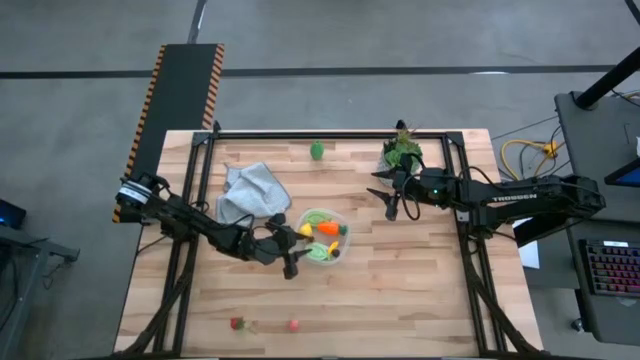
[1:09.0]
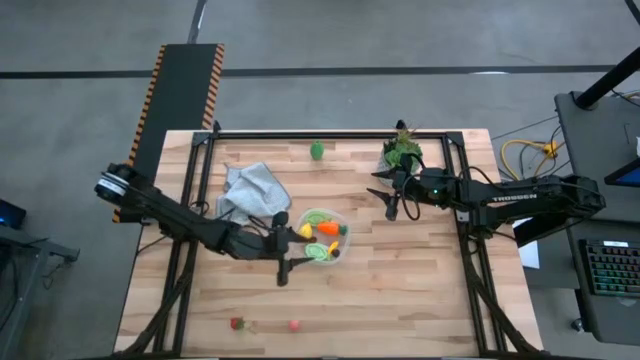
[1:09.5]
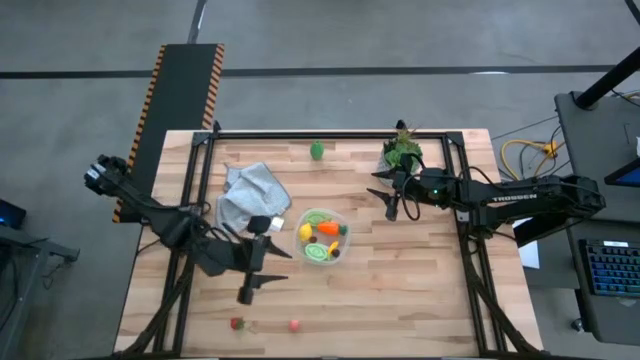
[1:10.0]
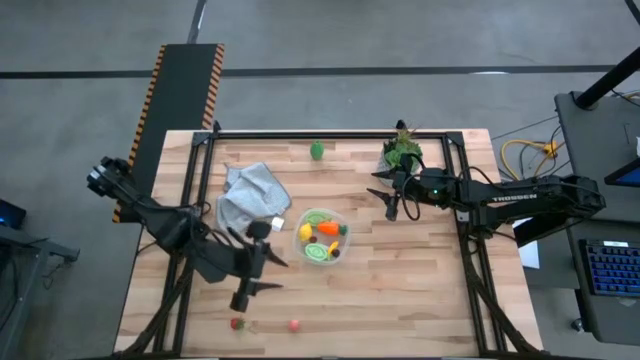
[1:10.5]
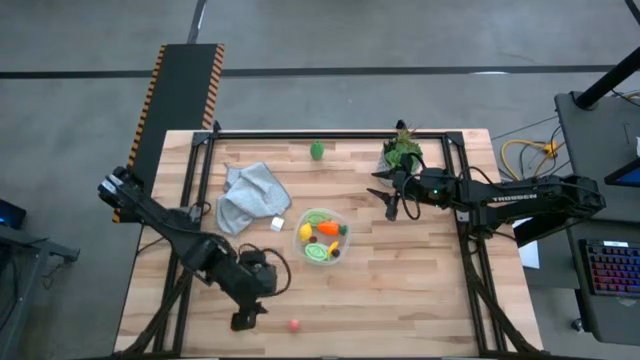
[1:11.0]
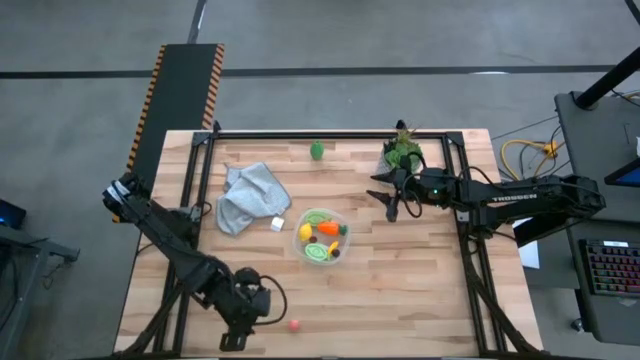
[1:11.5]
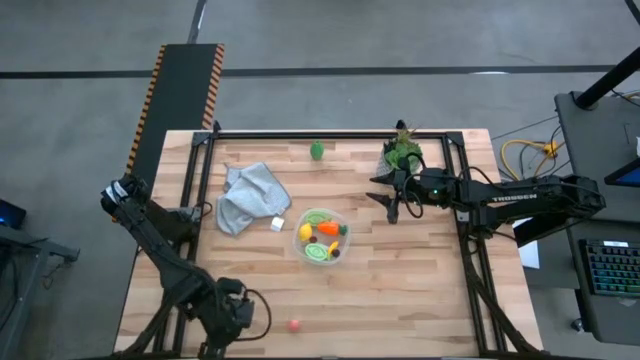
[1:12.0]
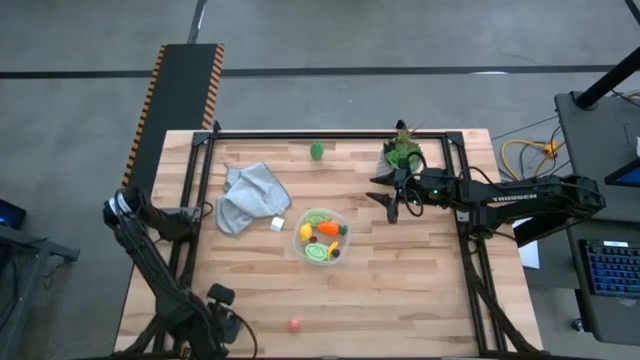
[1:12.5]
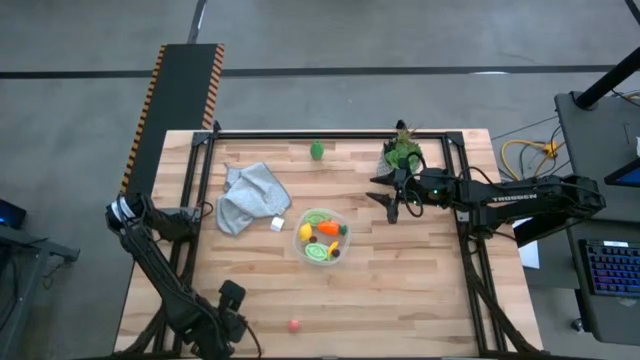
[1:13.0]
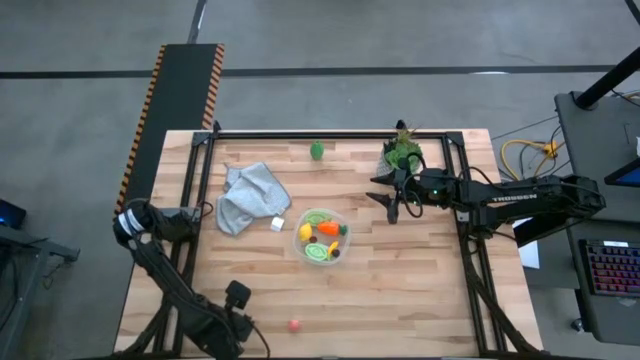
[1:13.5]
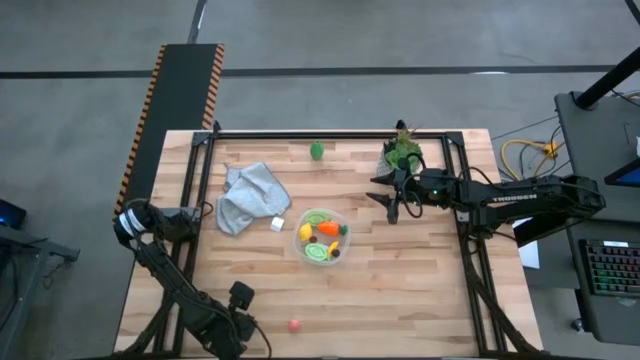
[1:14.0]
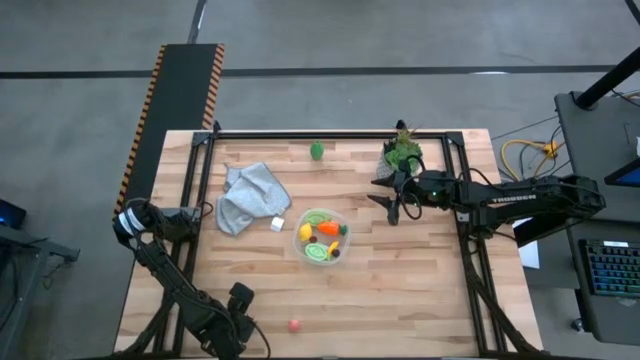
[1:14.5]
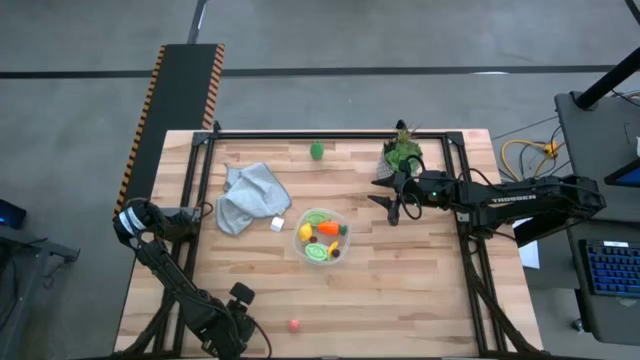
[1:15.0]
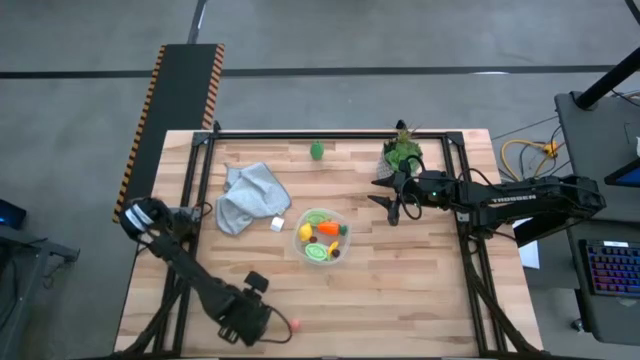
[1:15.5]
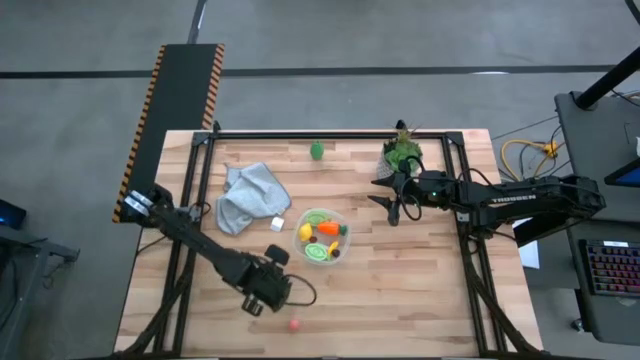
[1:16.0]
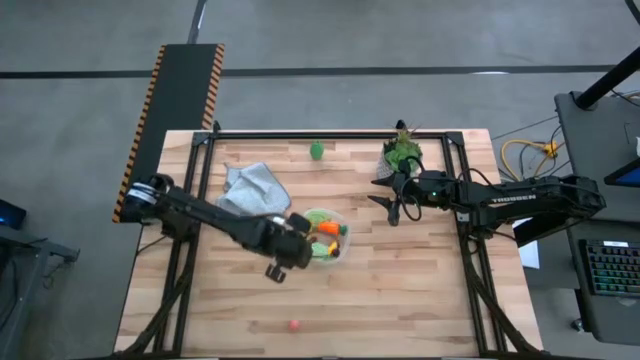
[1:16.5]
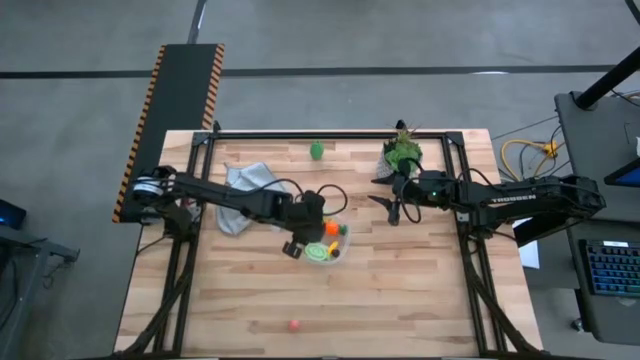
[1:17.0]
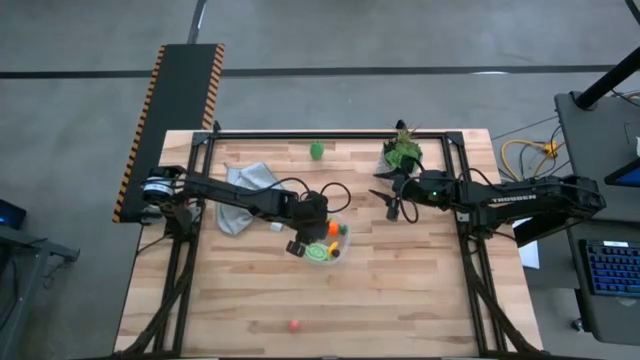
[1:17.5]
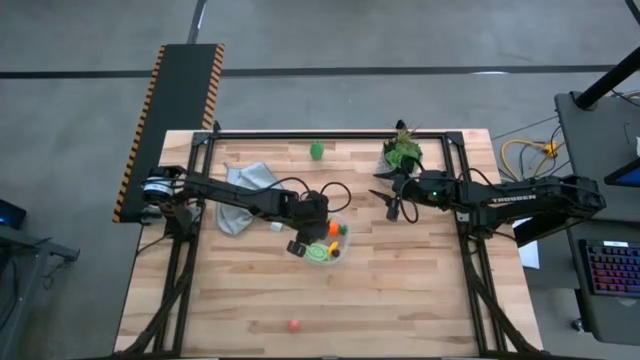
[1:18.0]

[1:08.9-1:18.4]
Task: Pick and placing Produce into tupperware
Put the red strawberry into the transparent bin

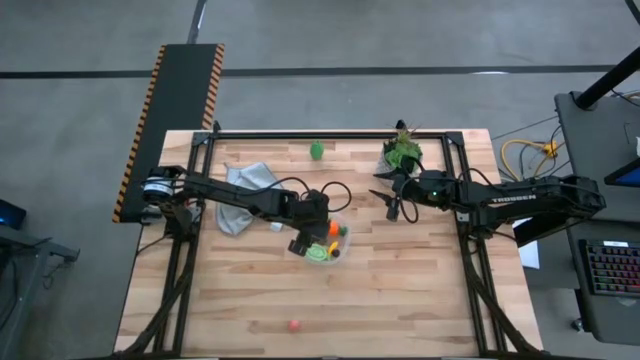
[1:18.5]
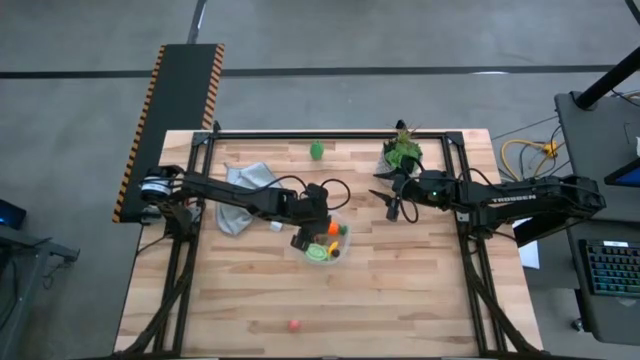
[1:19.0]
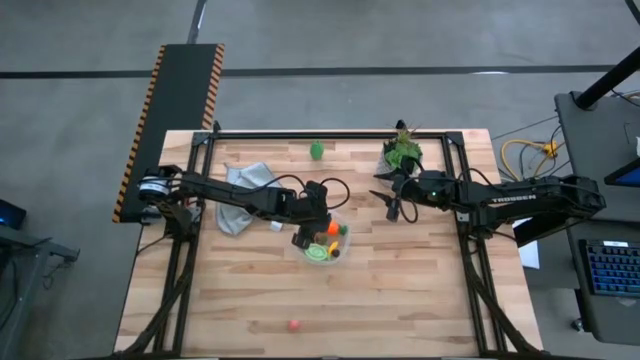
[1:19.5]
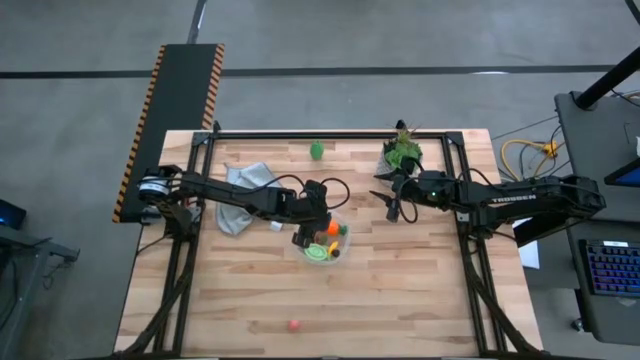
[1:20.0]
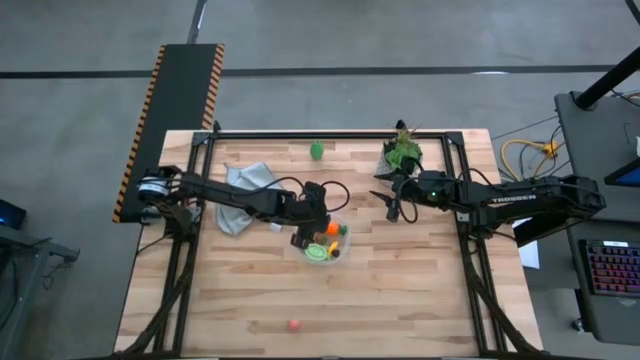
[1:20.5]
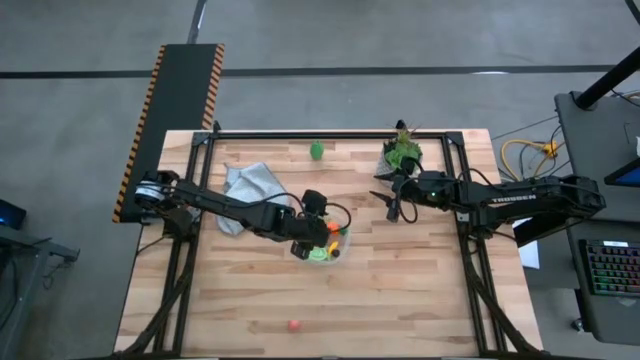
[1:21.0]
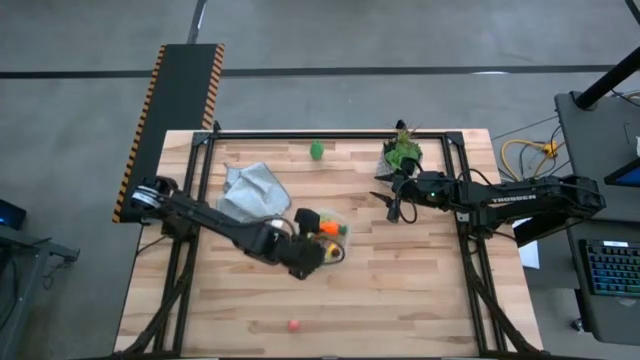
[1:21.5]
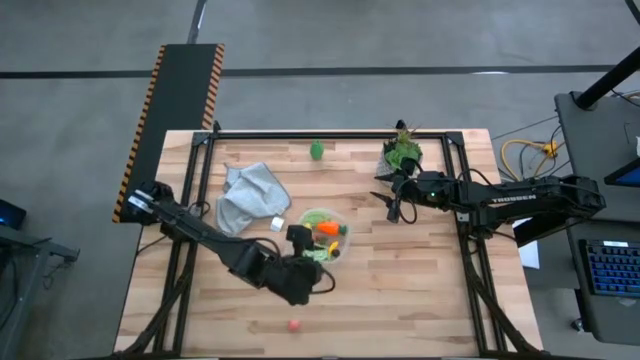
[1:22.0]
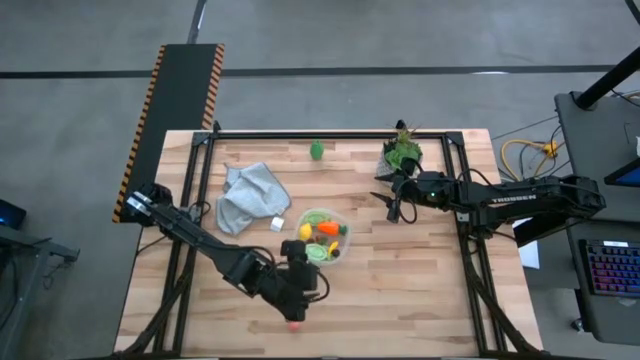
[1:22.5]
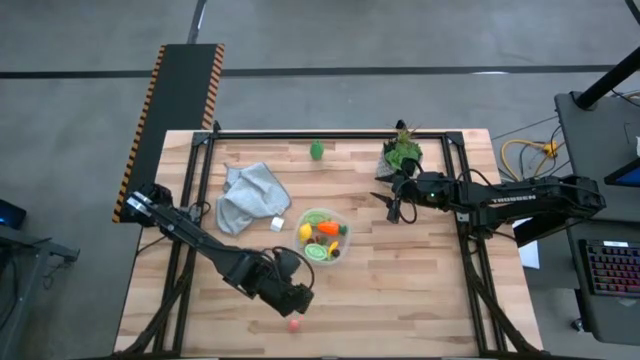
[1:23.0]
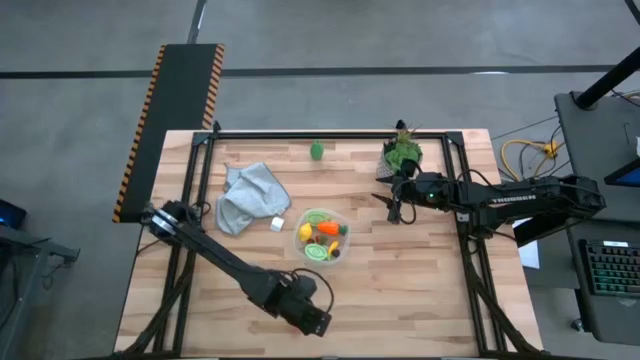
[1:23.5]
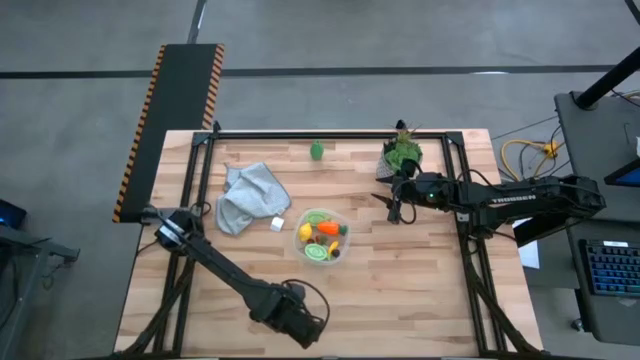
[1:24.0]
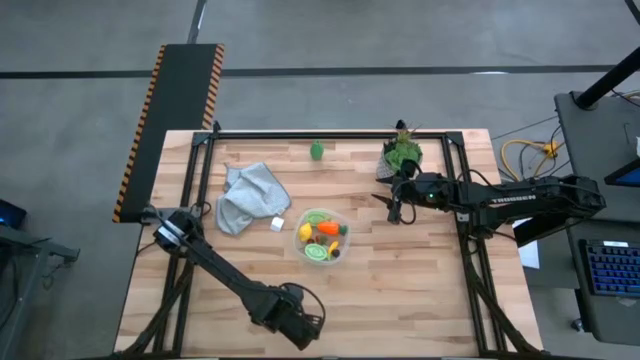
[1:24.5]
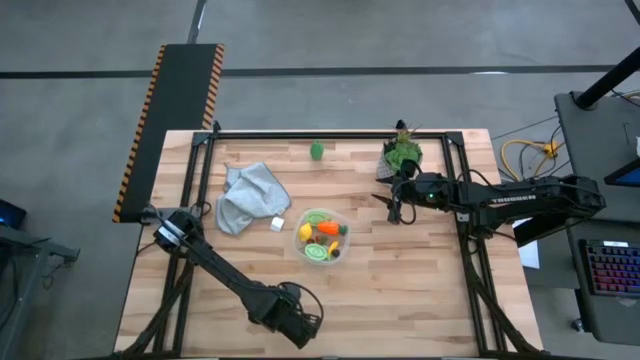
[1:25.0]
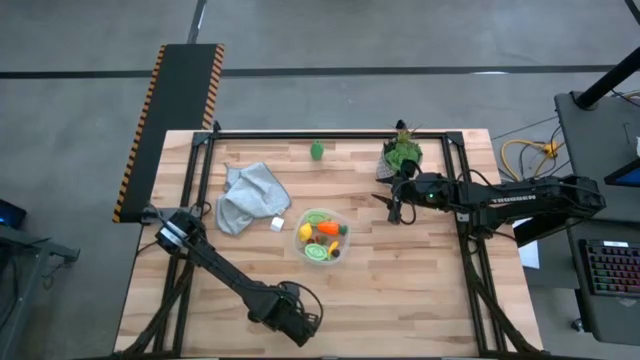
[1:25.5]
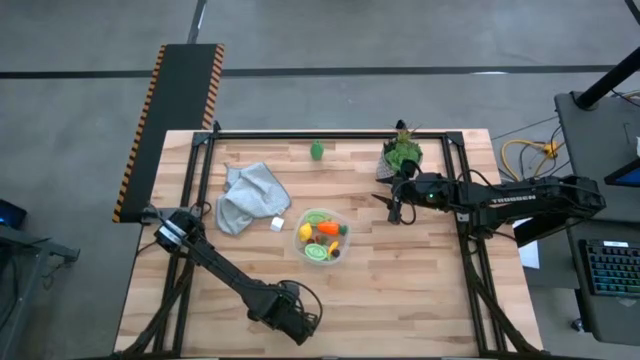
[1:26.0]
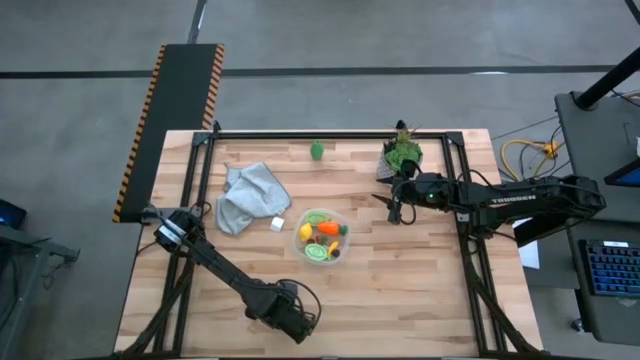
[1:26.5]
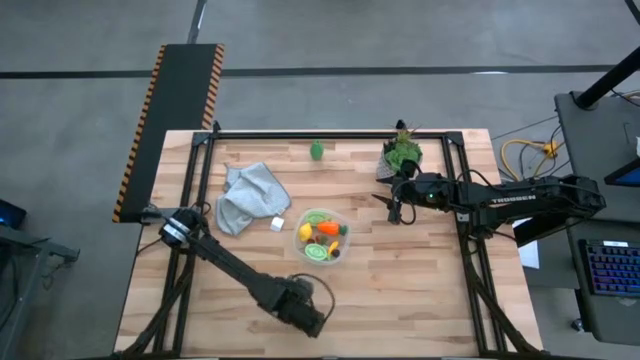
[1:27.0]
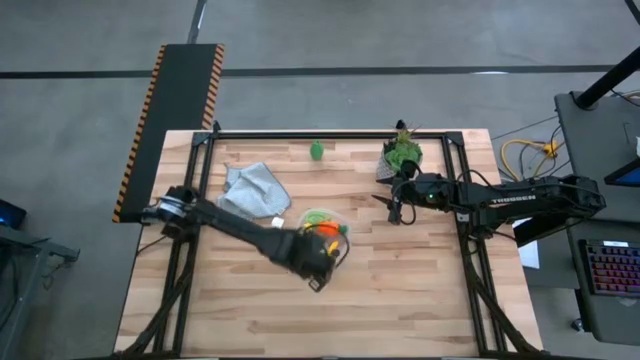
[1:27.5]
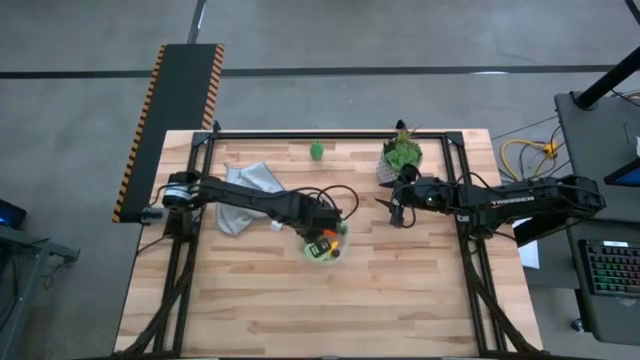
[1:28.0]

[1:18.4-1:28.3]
Put the pink peach into the transparent bin

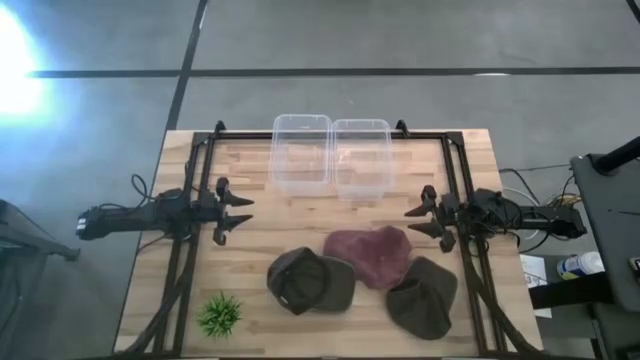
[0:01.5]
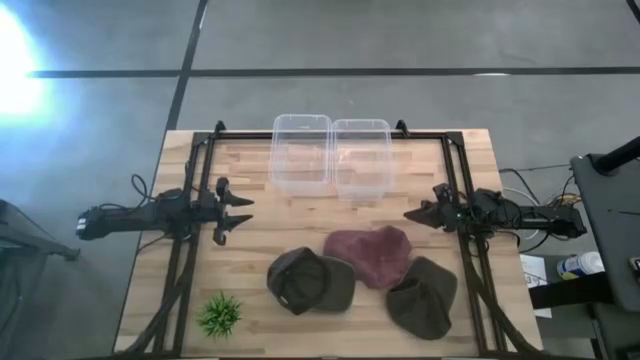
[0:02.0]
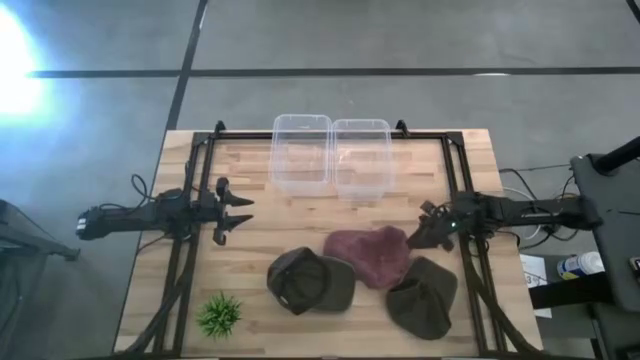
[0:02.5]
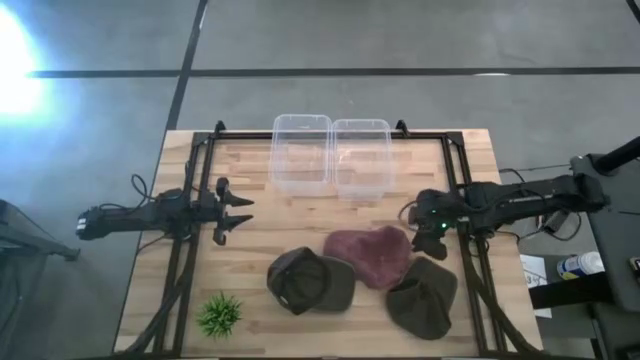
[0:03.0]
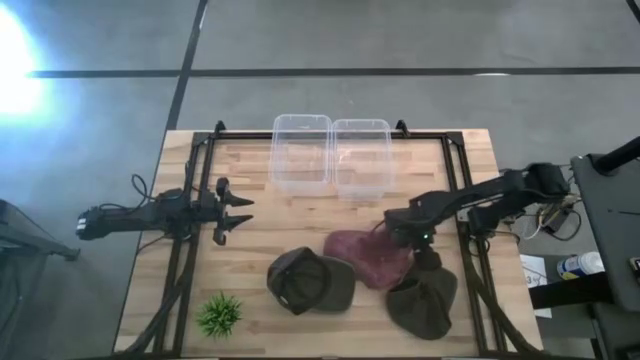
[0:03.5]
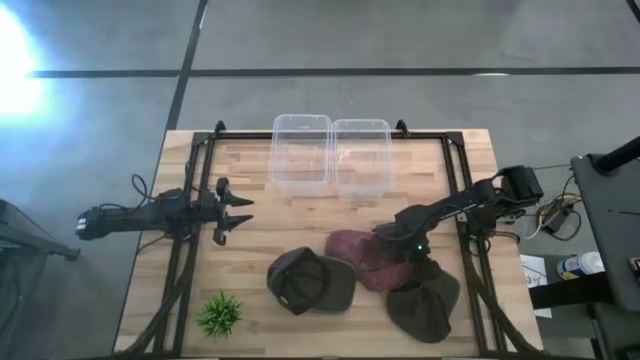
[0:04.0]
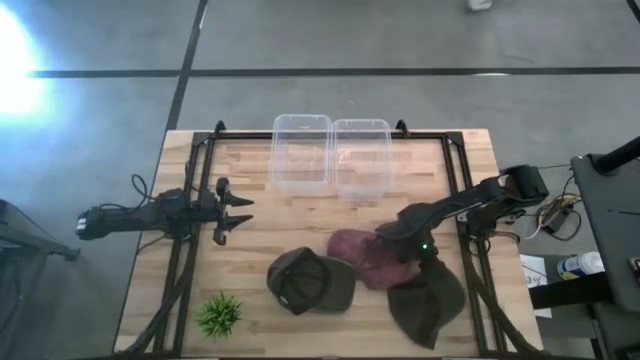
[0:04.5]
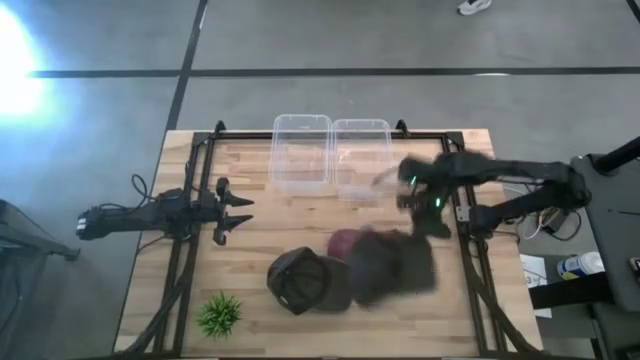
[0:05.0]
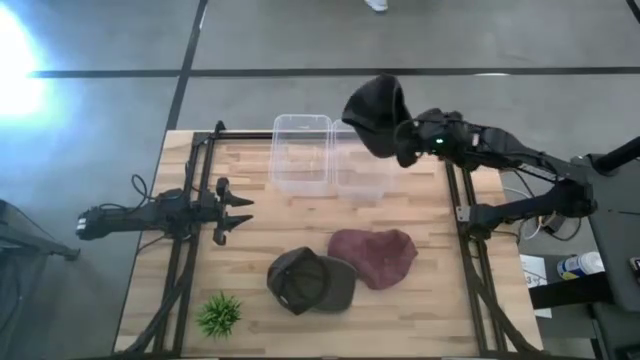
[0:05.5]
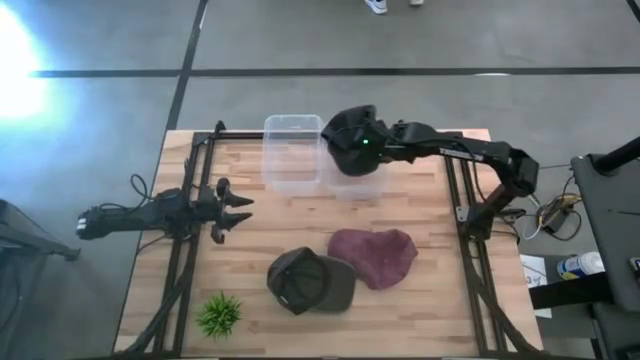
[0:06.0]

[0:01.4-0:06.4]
Task: Pick & Place hat
Put the right black cap into the right transparent bin
